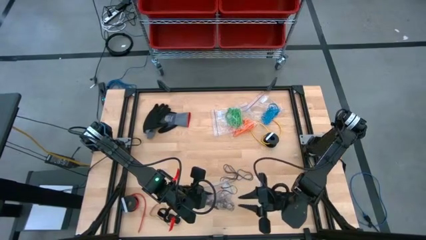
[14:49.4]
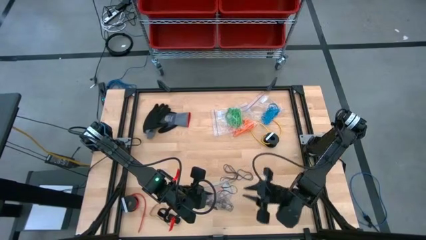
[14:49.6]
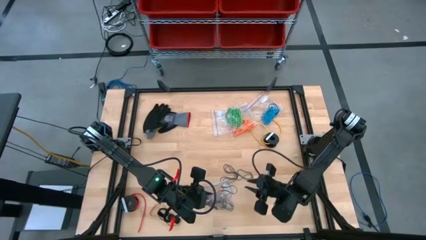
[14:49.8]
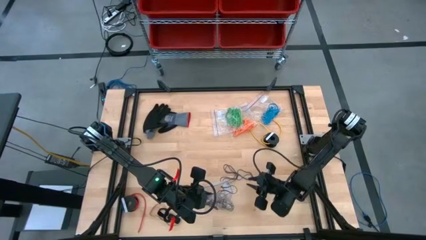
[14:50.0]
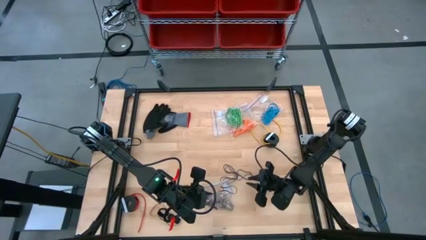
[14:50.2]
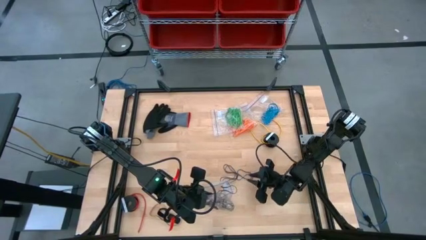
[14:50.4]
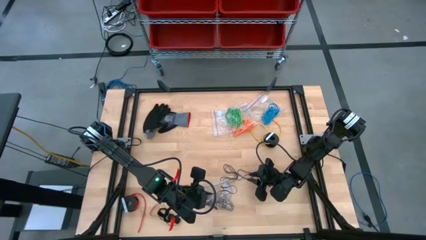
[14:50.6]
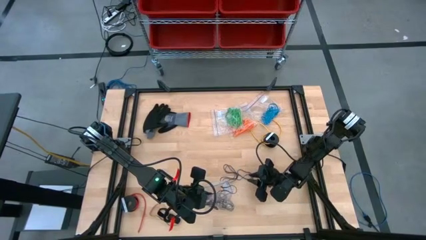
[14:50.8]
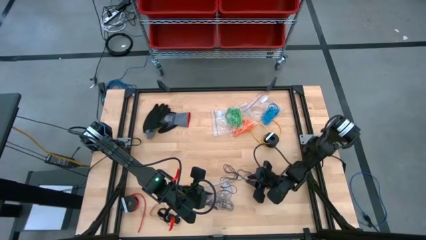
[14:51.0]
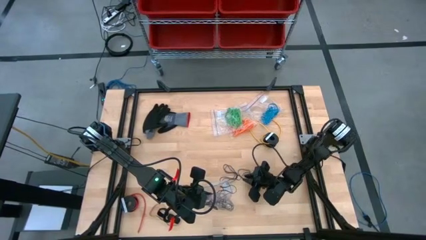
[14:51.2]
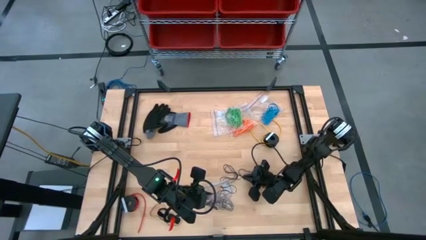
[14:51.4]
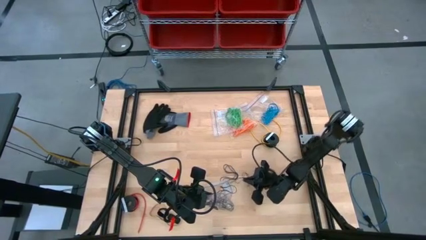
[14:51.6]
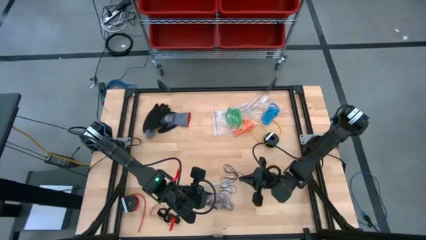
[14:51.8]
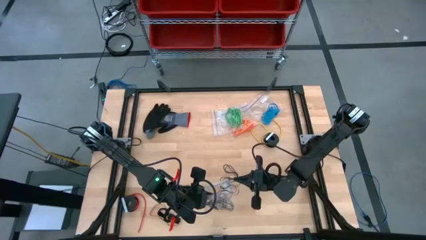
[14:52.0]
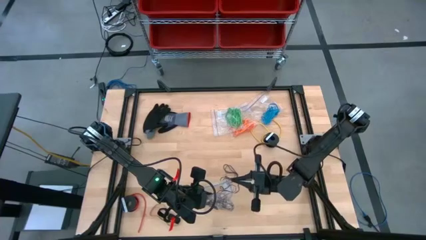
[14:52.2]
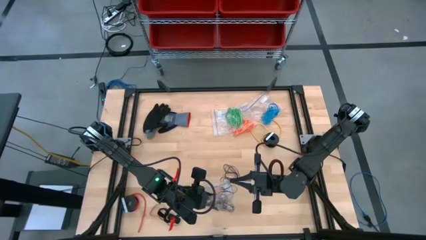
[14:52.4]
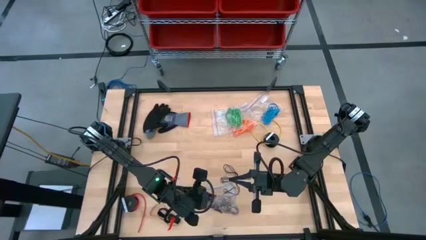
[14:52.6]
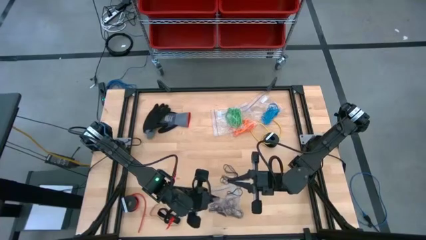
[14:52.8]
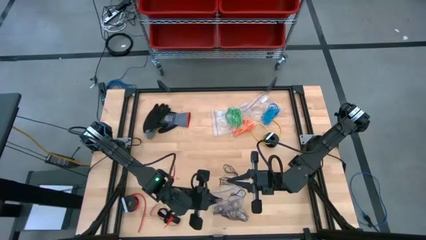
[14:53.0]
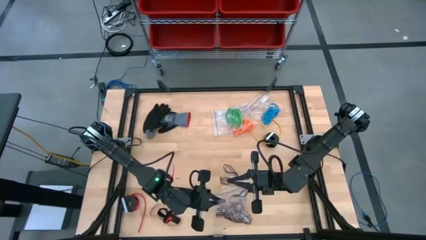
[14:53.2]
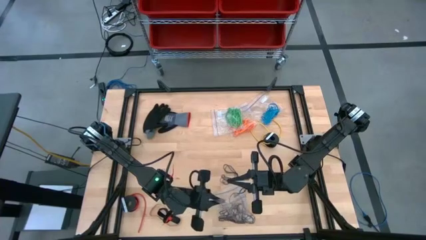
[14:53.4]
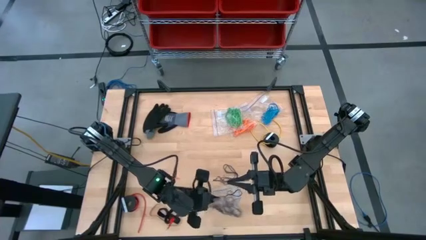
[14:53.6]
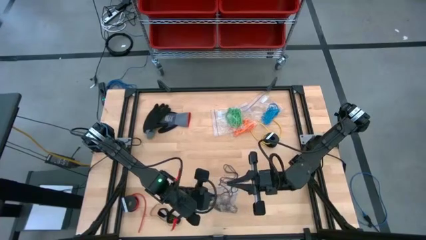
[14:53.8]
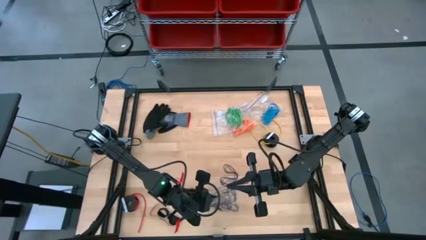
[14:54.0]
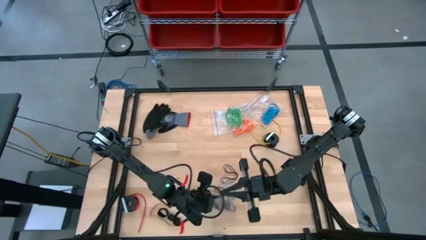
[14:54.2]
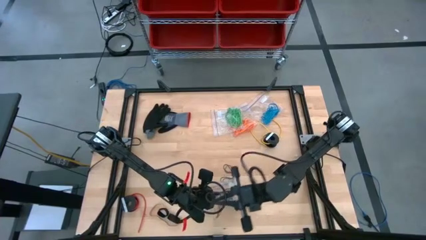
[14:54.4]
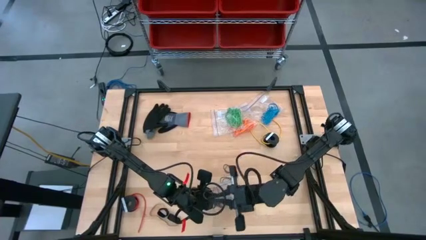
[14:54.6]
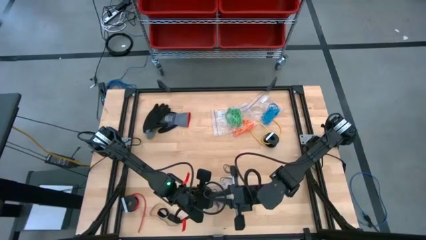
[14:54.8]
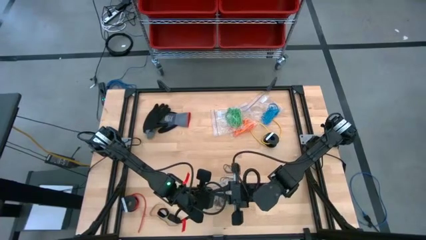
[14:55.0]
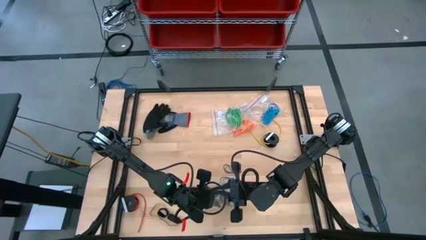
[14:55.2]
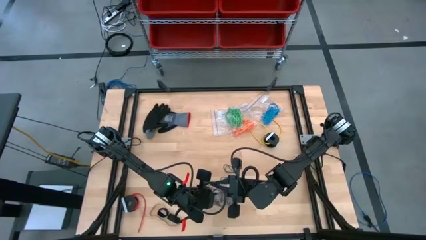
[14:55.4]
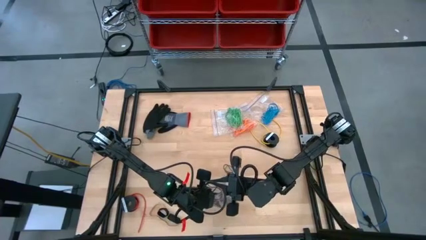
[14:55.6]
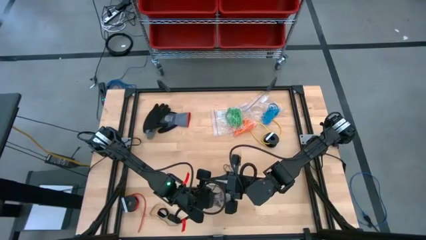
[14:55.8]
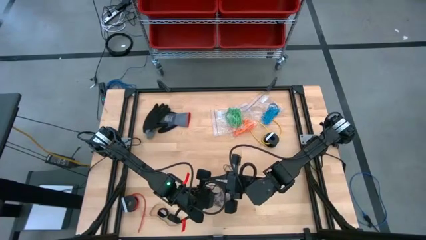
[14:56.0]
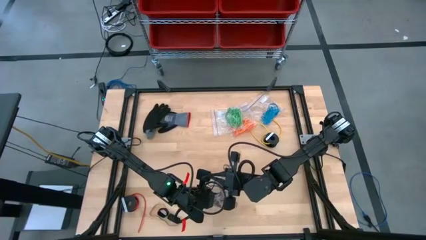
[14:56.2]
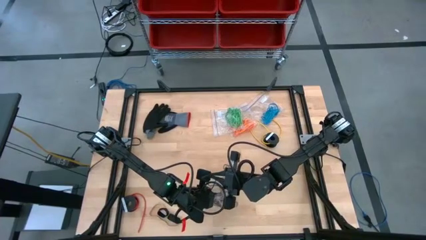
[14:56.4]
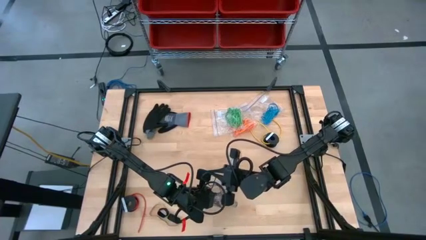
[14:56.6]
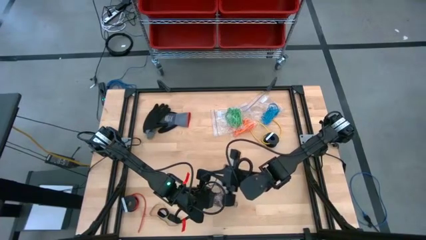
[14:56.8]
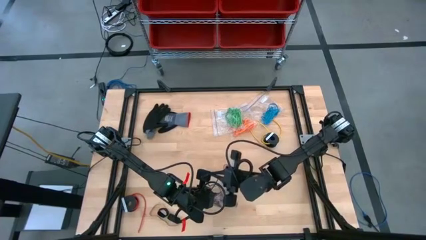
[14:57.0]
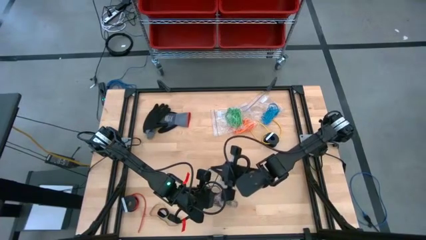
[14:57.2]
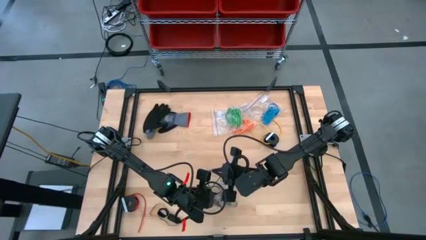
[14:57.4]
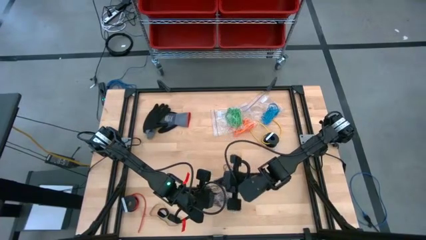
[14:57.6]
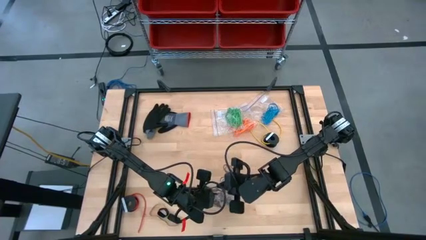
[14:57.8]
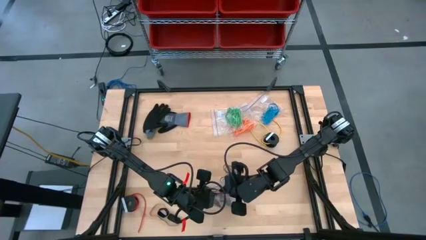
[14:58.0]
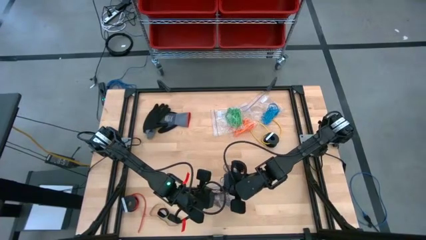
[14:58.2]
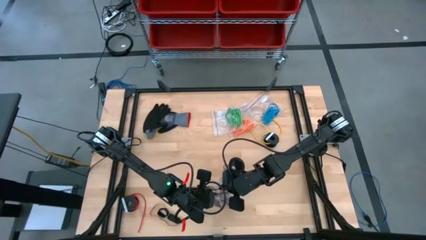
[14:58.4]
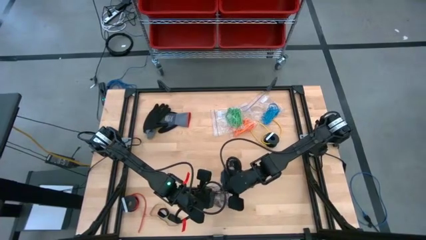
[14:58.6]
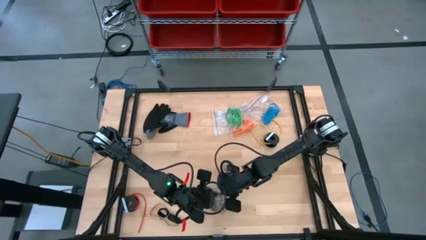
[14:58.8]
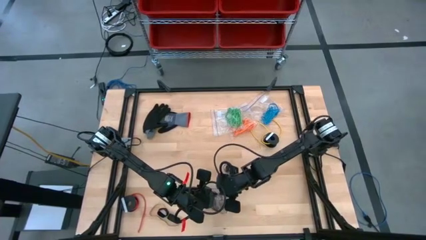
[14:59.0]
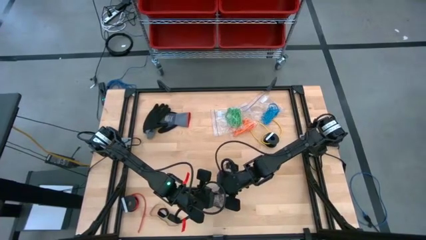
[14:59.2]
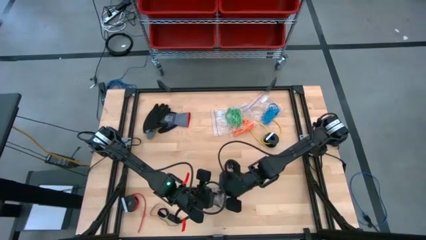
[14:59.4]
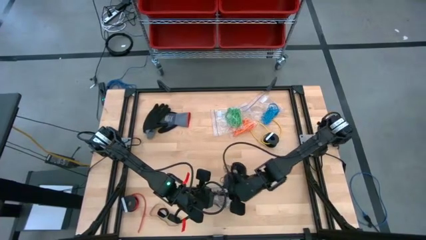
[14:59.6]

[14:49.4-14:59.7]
Task: Sort rubber bands
Put the black rubber band into the transparent zip bag

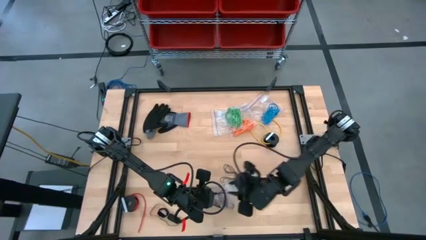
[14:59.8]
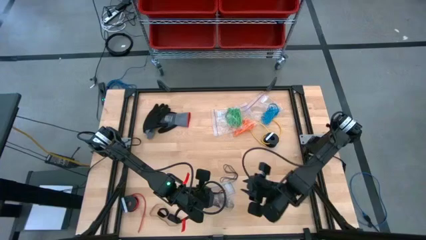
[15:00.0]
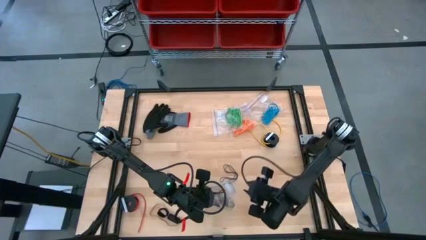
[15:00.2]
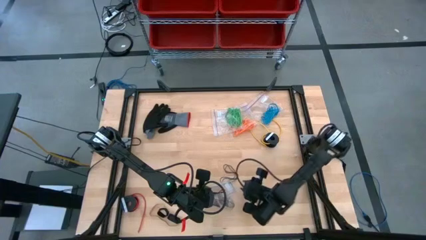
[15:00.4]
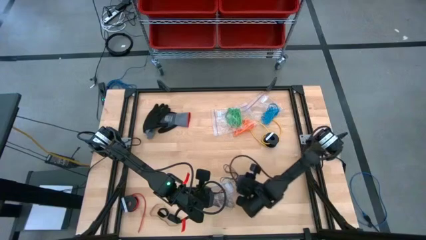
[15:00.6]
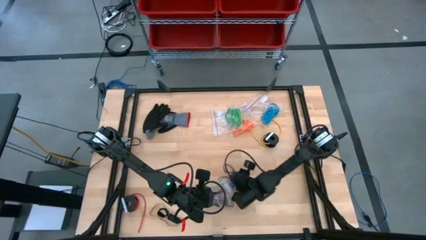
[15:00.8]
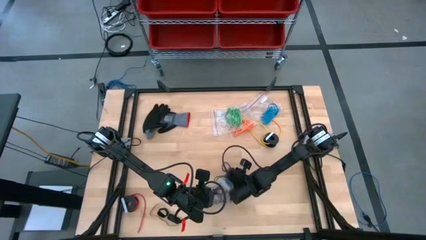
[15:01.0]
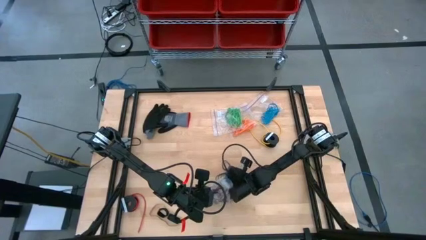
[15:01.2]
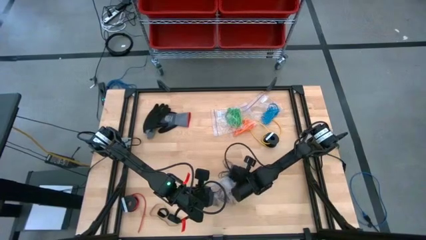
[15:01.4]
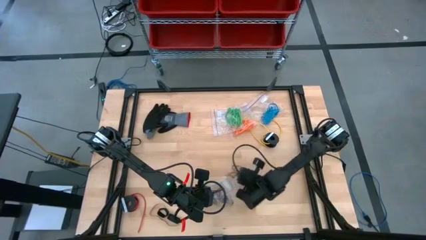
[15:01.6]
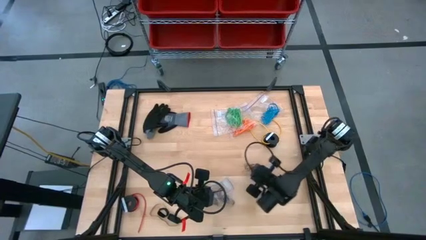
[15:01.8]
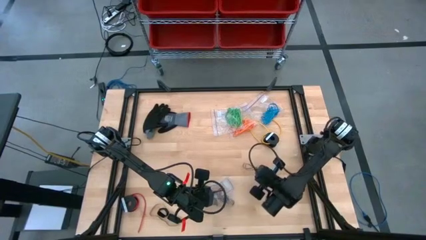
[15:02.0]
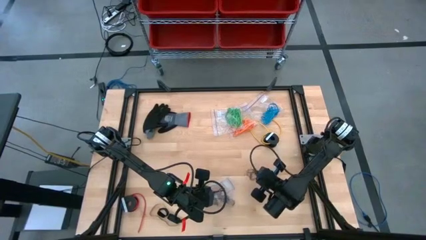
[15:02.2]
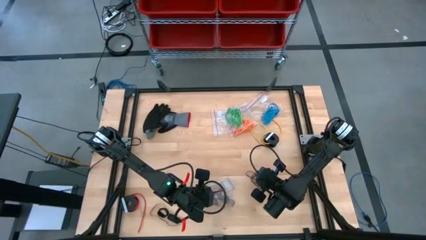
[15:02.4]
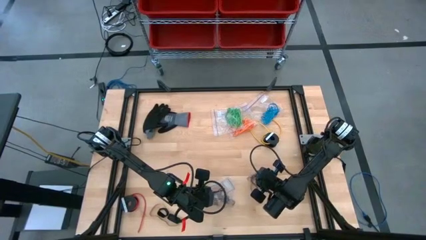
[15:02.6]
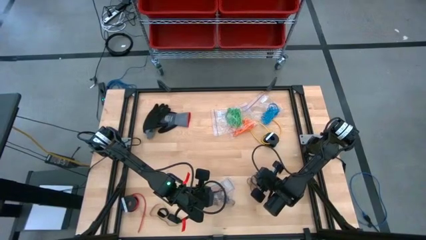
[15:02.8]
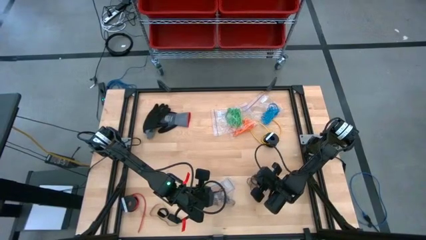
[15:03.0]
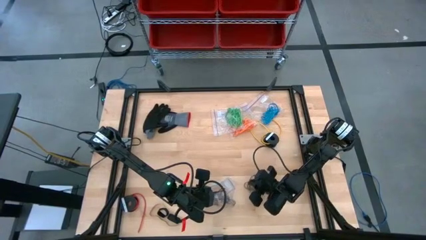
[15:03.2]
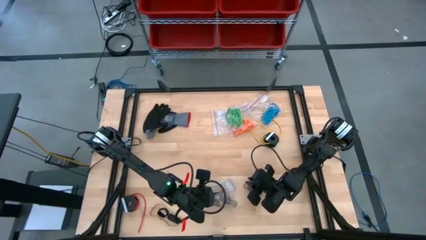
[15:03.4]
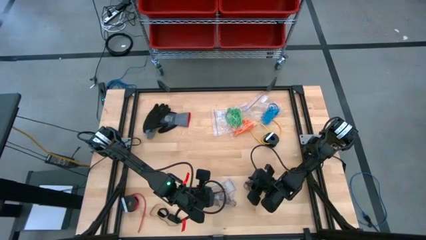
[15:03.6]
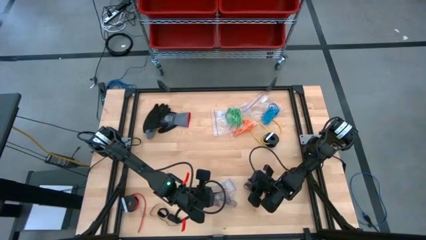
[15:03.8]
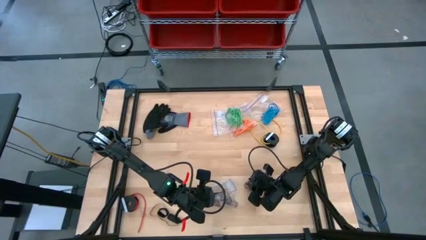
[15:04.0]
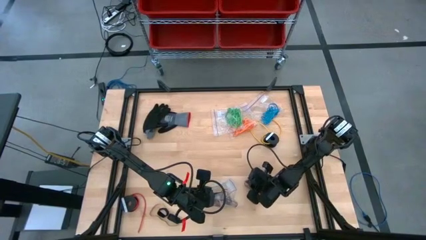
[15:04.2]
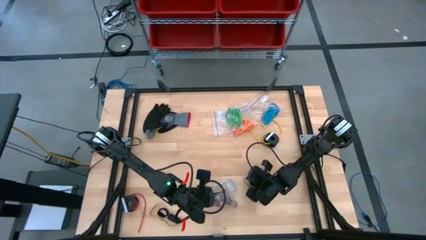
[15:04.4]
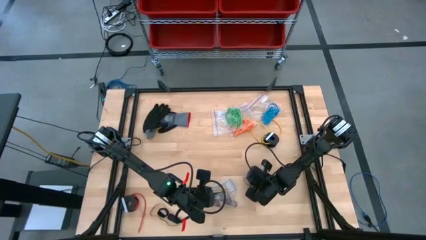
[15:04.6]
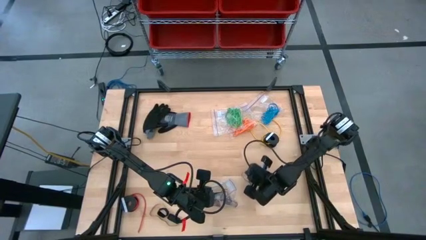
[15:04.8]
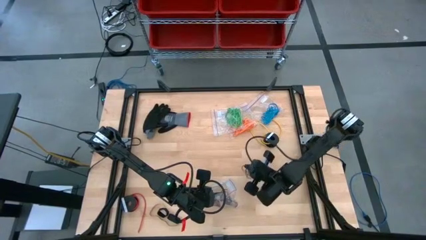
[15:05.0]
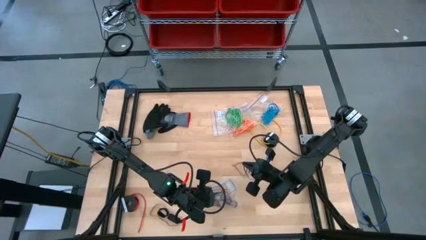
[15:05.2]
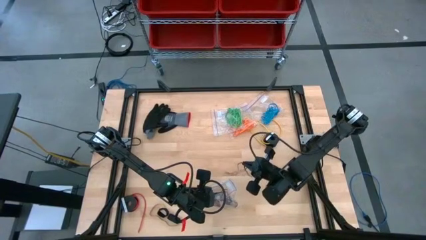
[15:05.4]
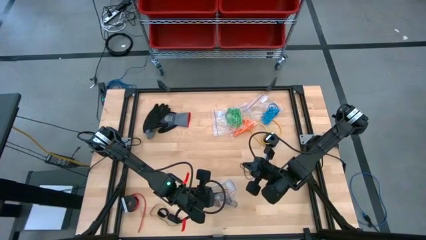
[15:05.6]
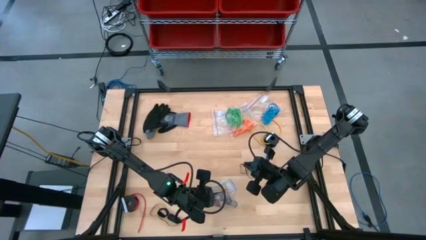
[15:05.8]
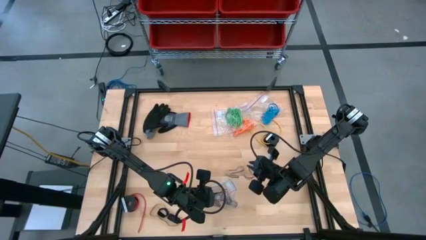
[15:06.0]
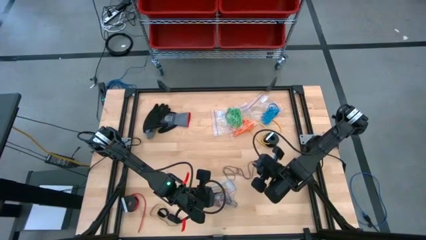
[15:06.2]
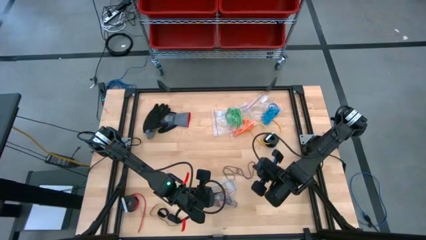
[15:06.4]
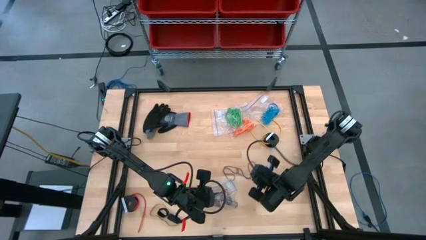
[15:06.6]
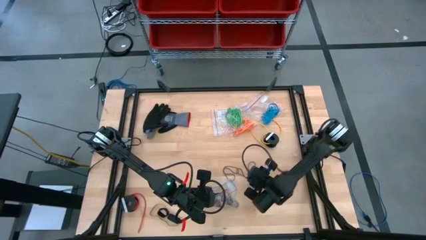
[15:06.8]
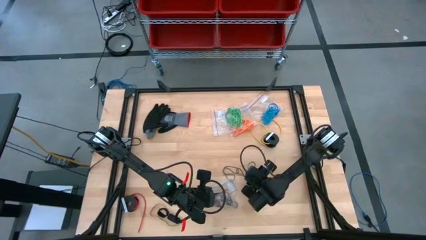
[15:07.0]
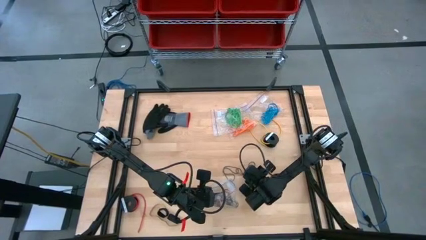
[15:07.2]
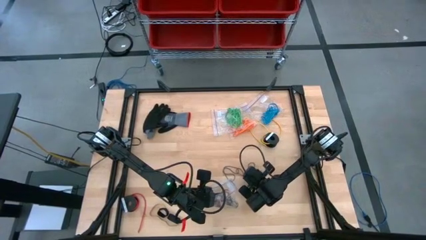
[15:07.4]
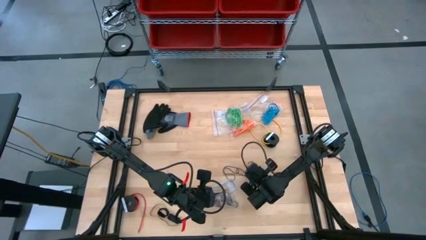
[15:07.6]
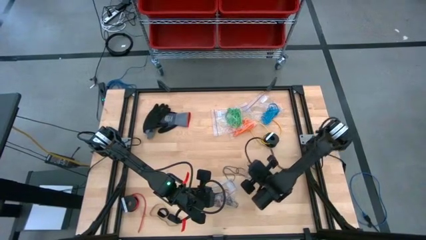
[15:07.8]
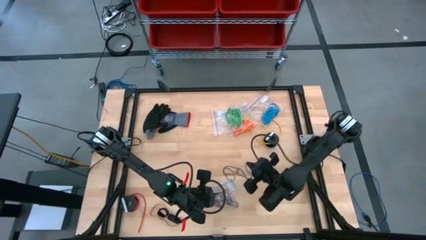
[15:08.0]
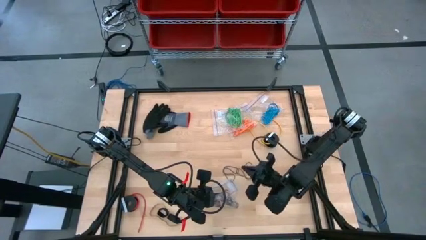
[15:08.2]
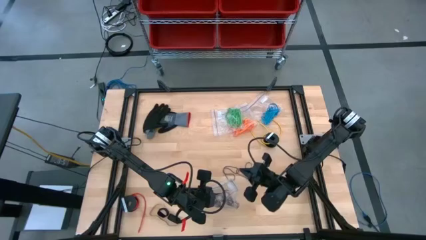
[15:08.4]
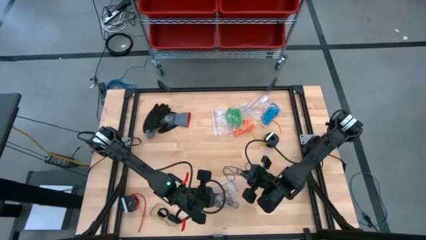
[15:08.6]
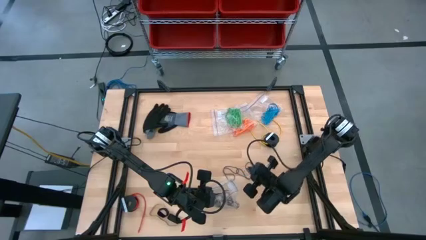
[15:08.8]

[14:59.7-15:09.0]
Put the black rubber band into the transparent zip bag
